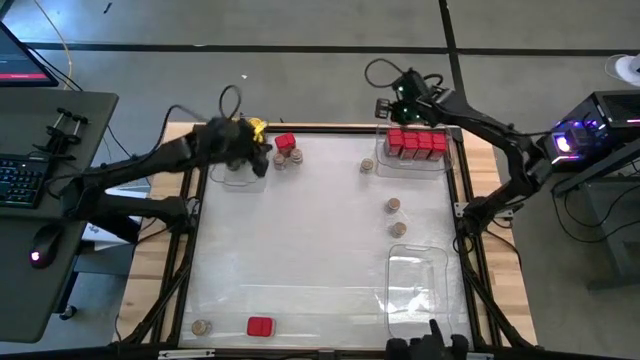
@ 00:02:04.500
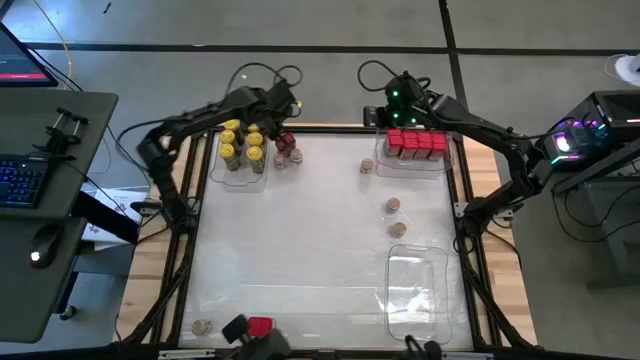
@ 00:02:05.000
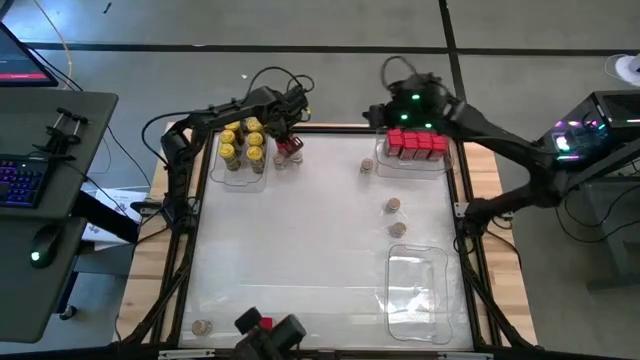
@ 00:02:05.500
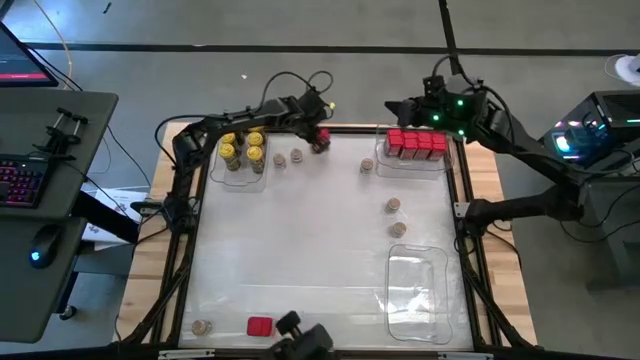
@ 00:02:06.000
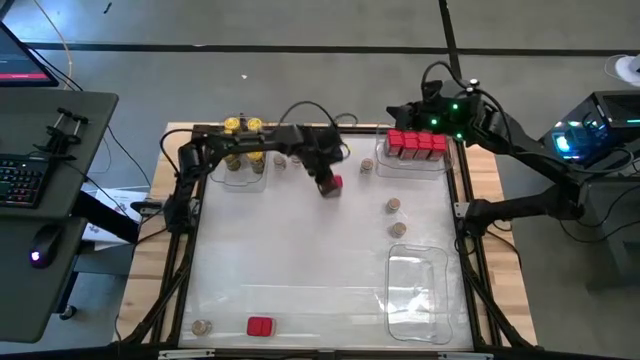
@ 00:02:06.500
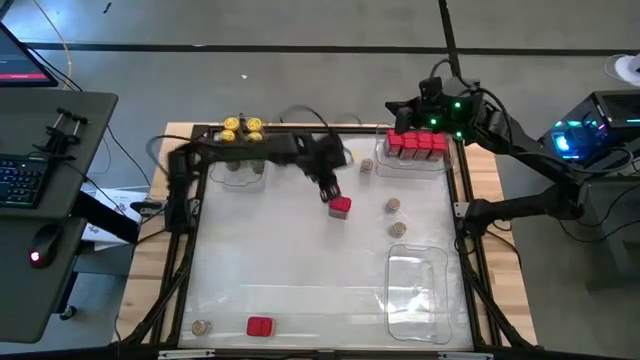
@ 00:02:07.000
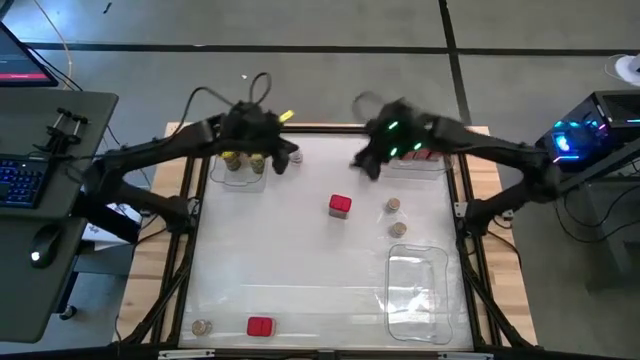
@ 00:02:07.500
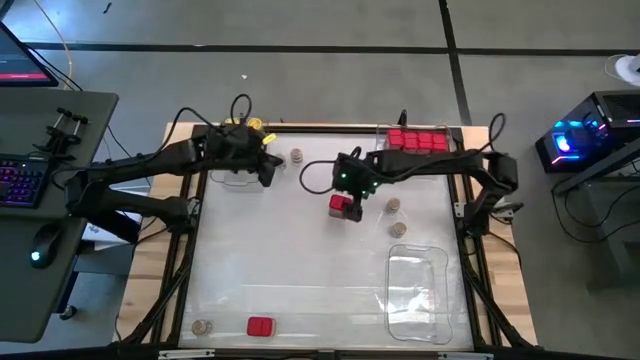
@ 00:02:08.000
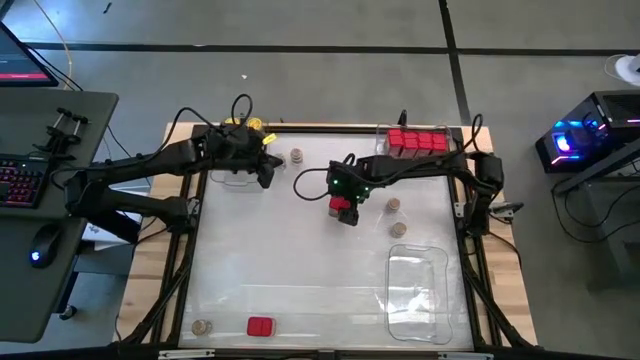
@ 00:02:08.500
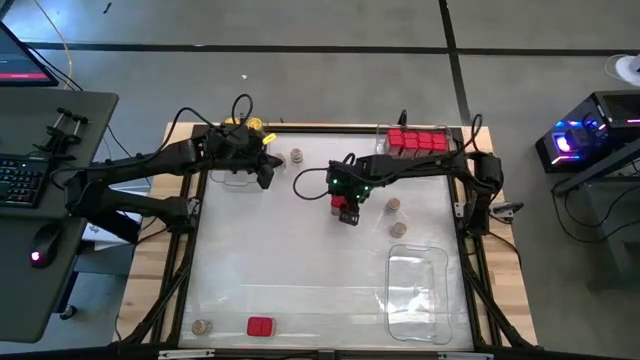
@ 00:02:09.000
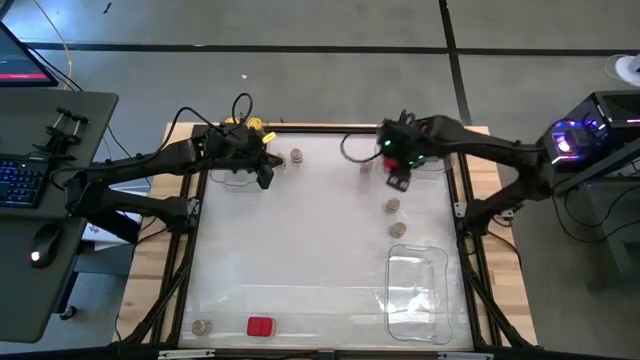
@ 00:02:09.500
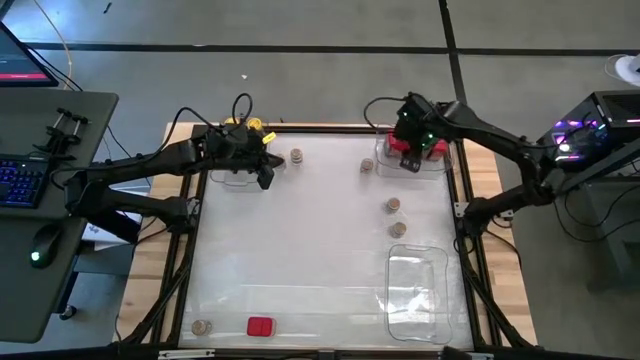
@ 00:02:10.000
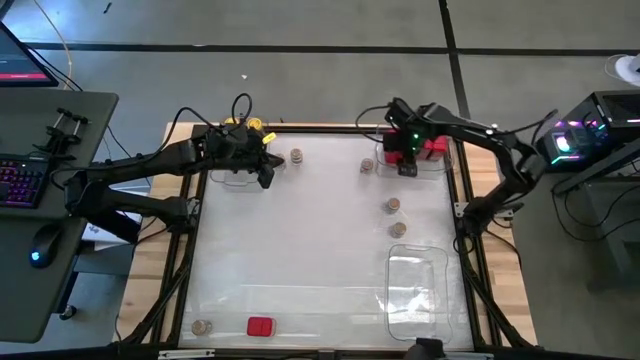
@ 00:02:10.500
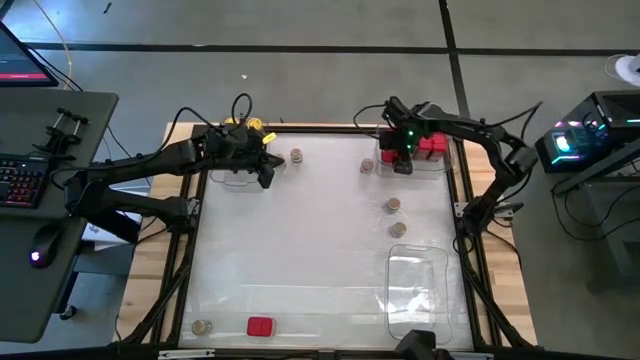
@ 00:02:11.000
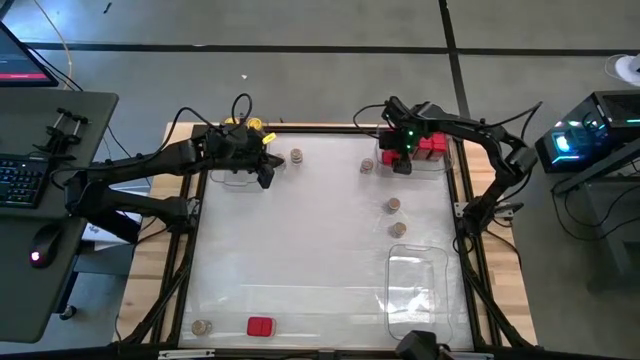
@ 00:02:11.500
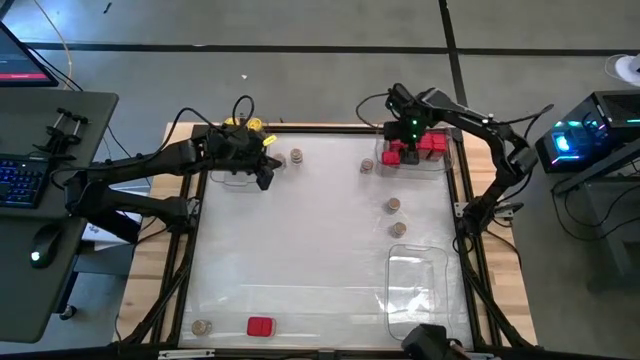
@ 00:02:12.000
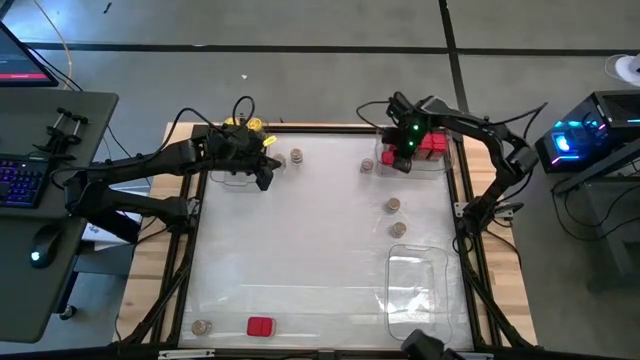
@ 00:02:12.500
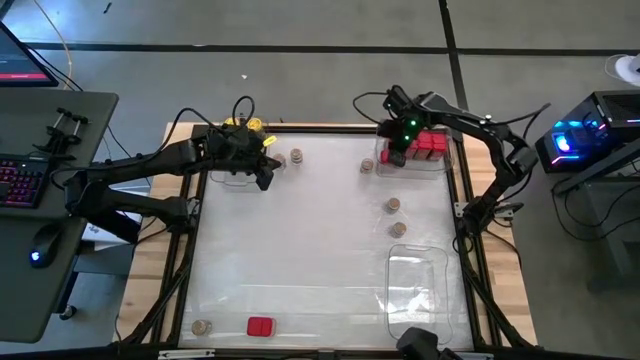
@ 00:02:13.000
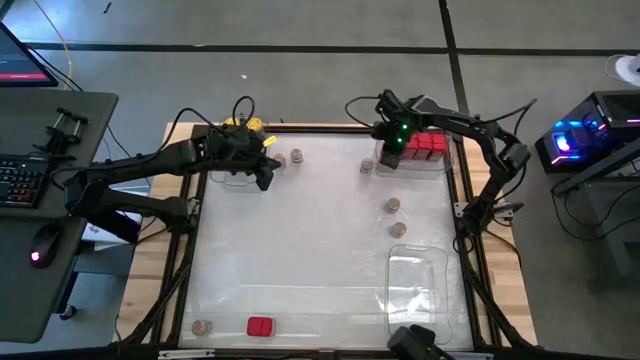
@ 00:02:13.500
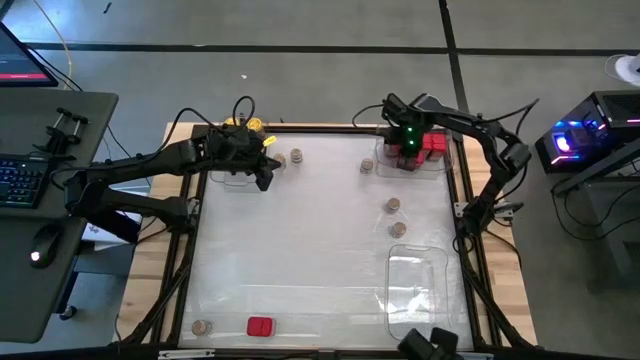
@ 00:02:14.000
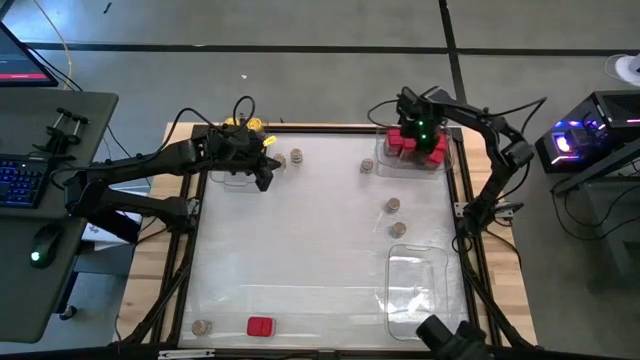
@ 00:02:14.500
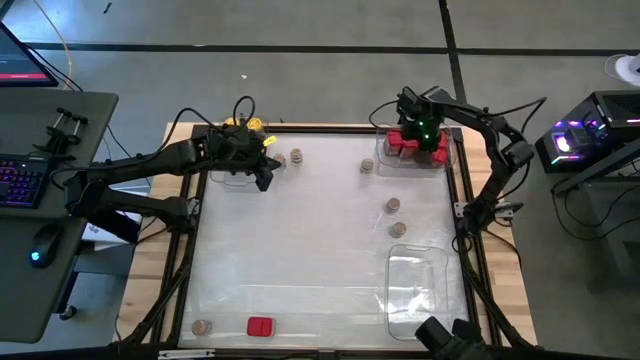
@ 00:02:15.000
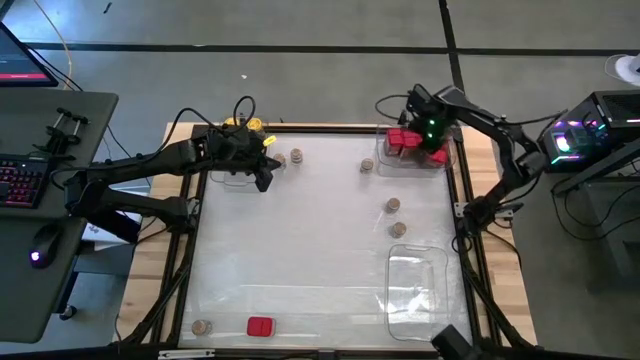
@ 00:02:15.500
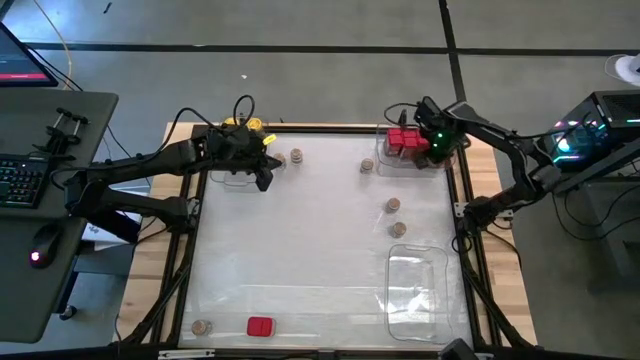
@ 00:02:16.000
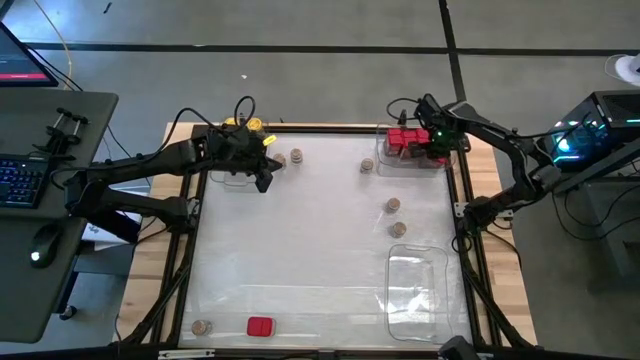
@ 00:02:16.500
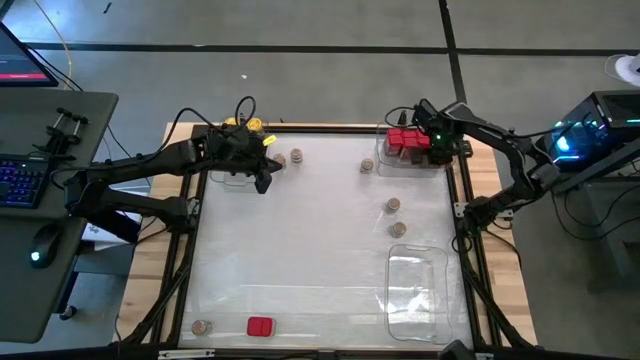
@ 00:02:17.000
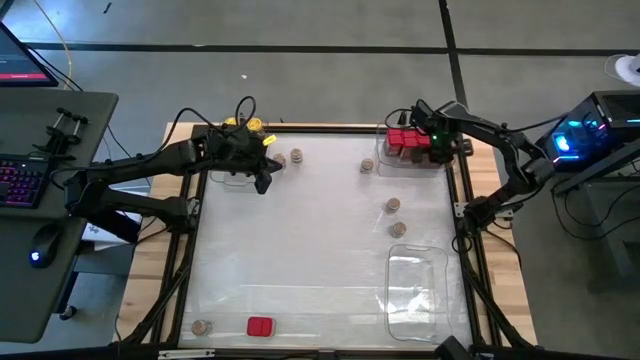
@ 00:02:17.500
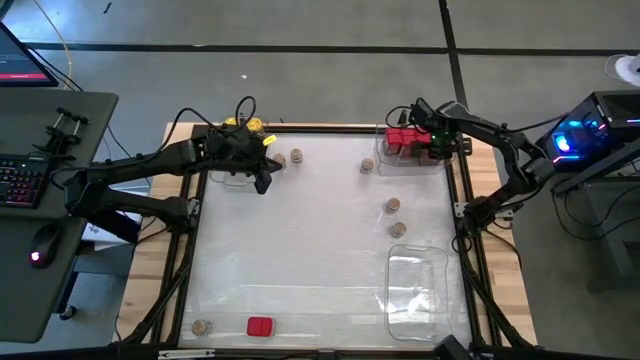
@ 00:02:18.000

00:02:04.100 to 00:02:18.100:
Task: Sort spices by type
Put the red seasoning can into the top right transparent bin

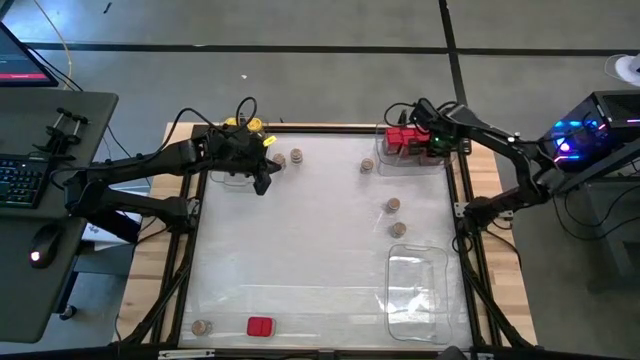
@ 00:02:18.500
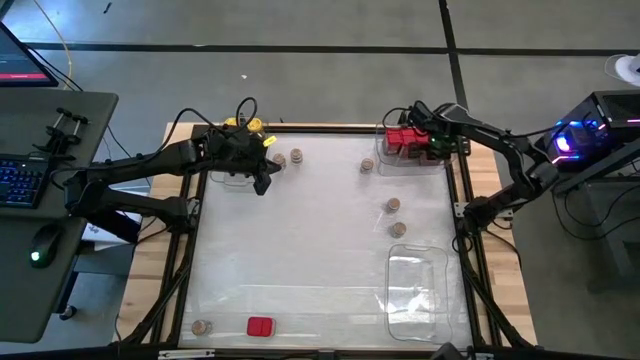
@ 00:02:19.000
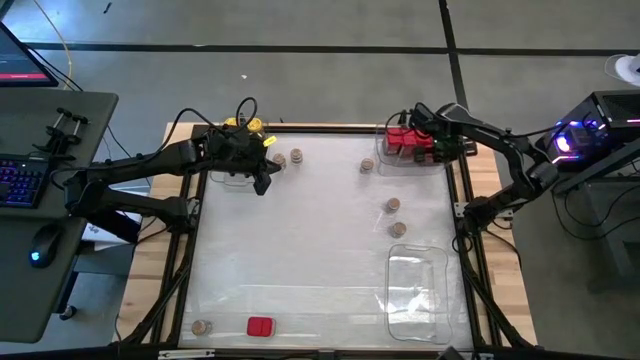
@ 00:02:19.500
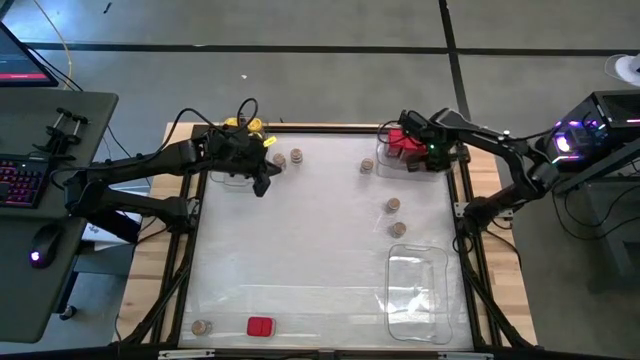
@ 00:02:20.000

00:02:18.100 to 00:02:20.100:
Adjust the top right transparent bin

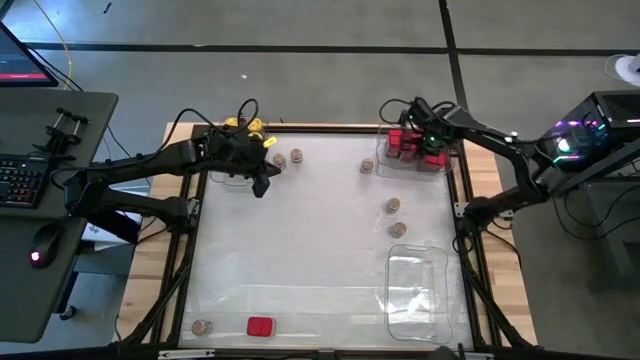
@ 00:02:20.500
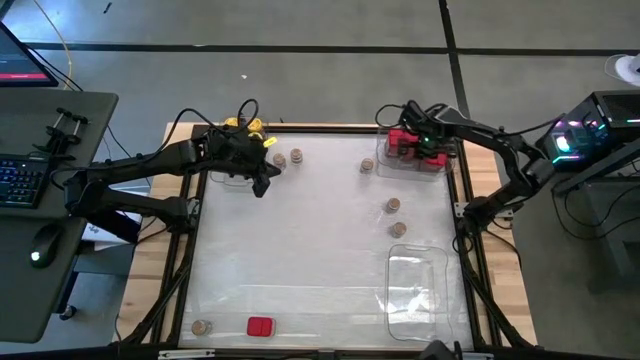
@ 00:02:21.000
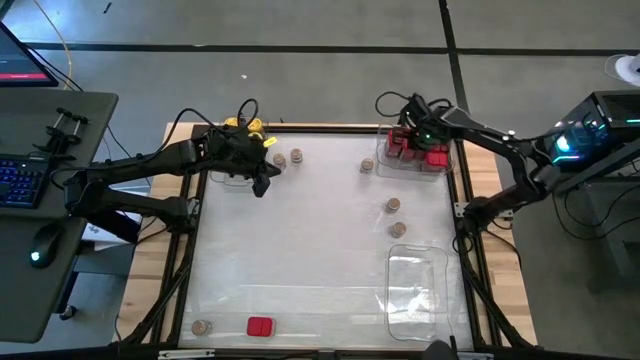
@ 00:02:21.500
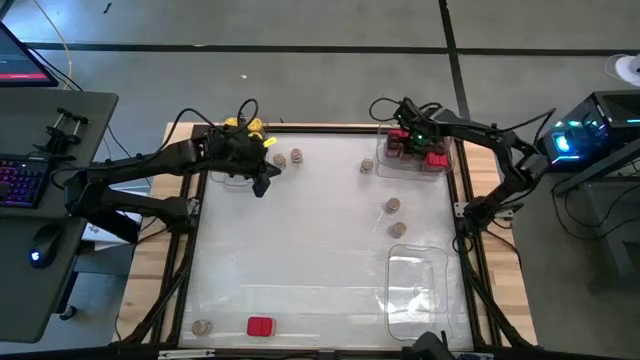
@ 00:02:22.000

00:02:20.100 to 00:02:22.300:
Adjust the red seasoning cans in the top right transparent bin
